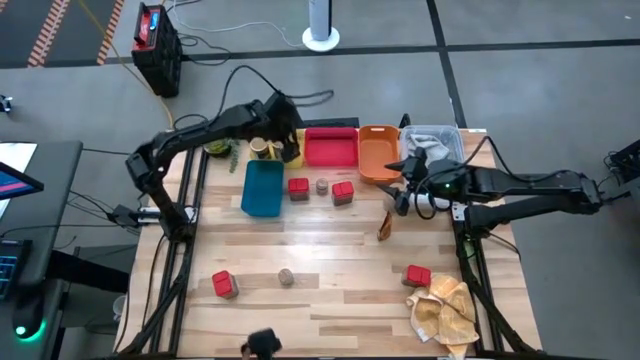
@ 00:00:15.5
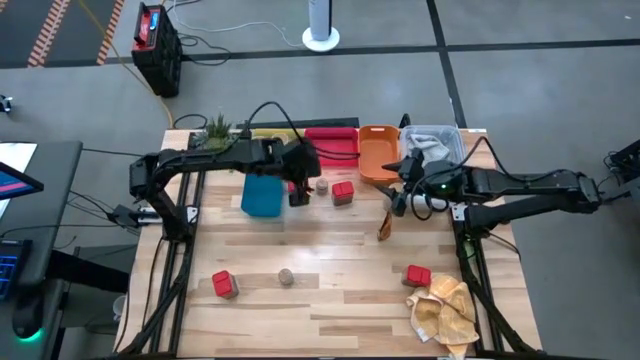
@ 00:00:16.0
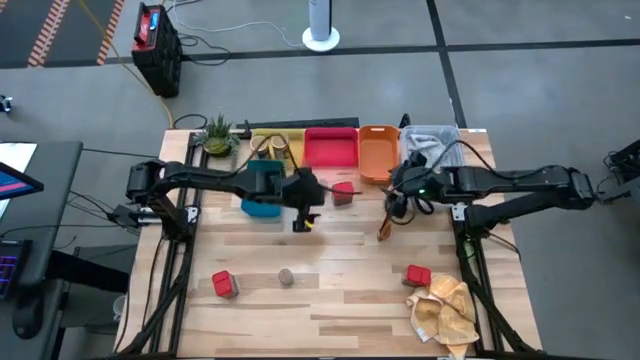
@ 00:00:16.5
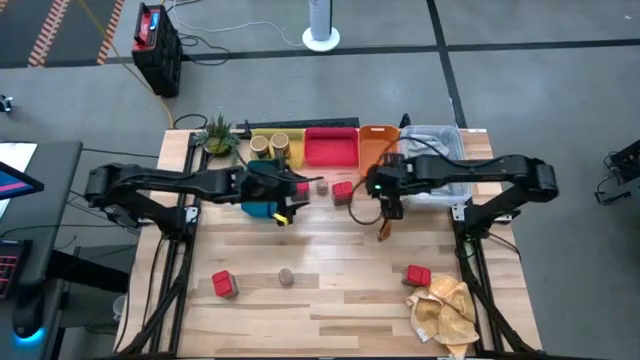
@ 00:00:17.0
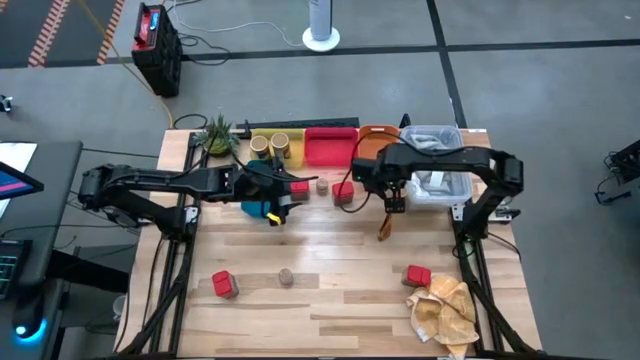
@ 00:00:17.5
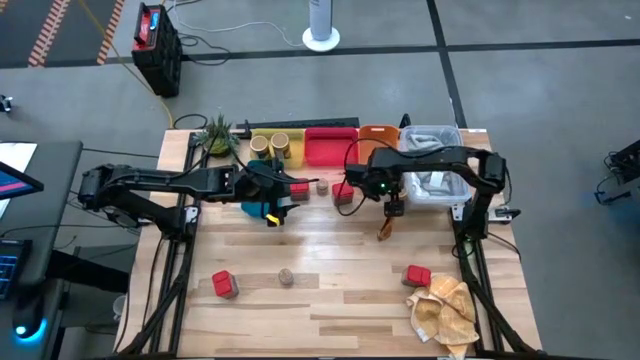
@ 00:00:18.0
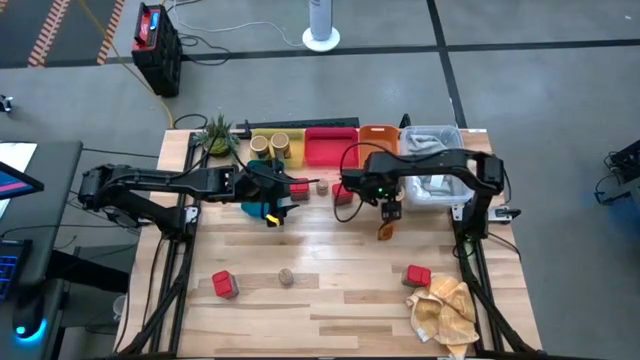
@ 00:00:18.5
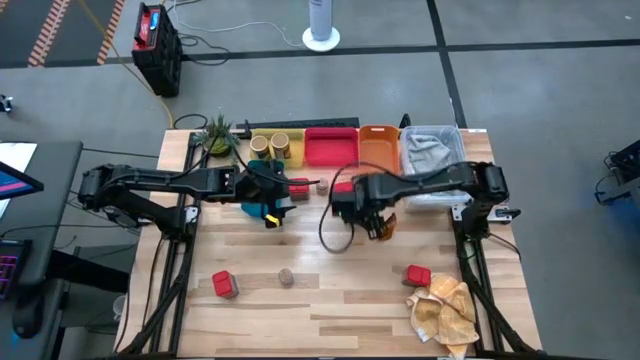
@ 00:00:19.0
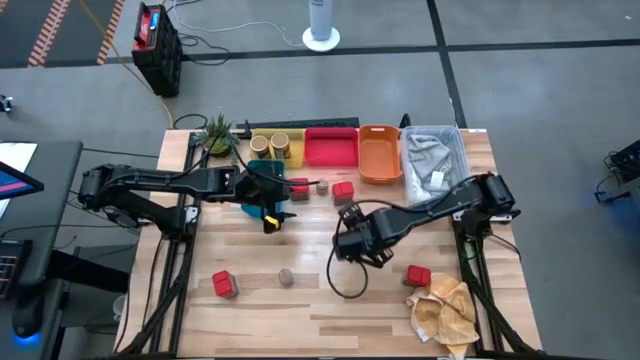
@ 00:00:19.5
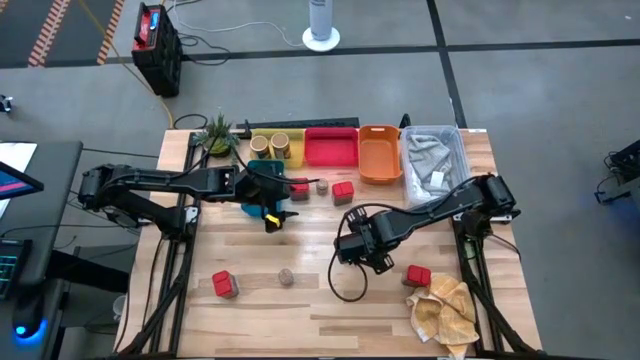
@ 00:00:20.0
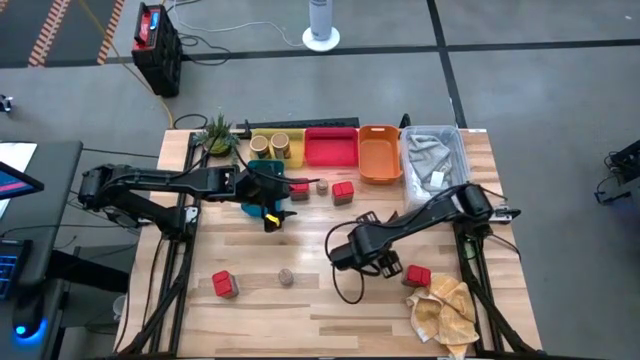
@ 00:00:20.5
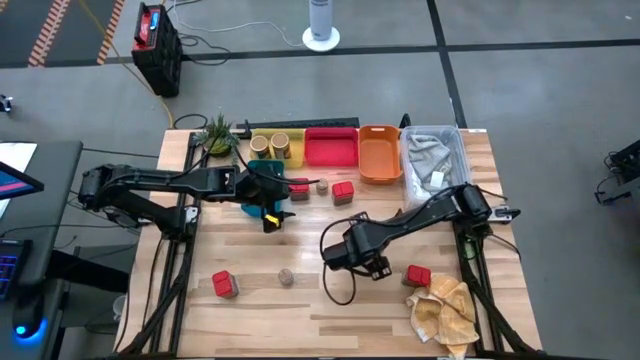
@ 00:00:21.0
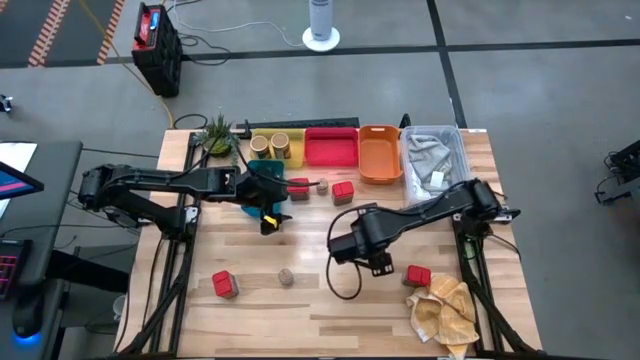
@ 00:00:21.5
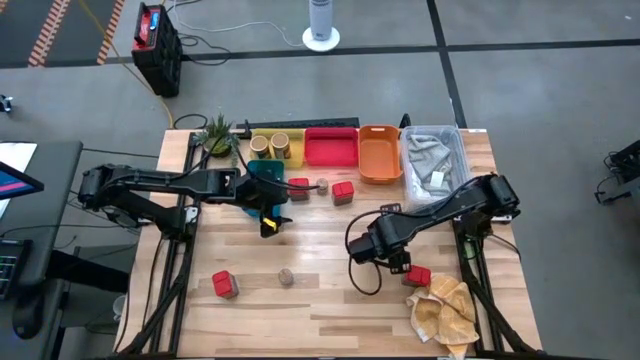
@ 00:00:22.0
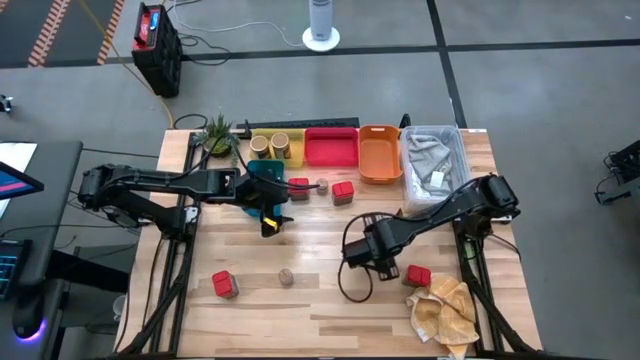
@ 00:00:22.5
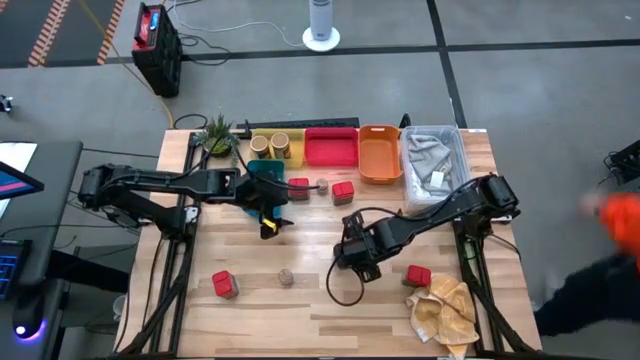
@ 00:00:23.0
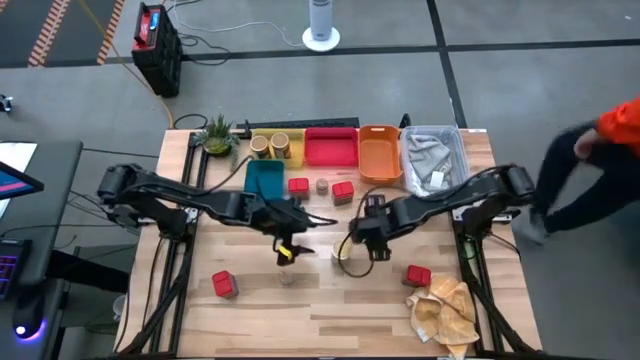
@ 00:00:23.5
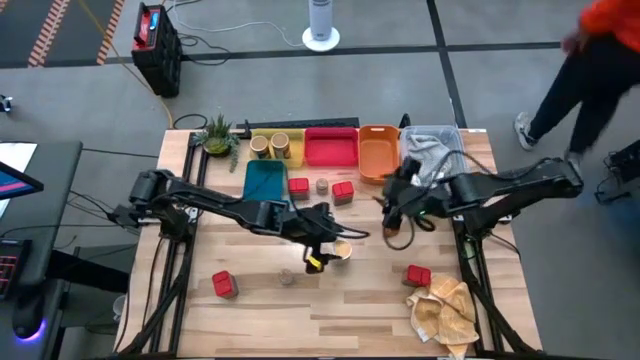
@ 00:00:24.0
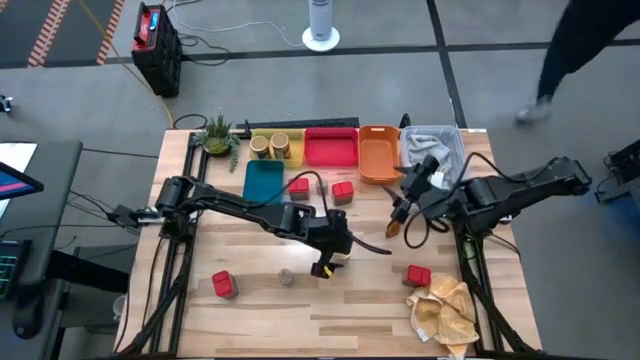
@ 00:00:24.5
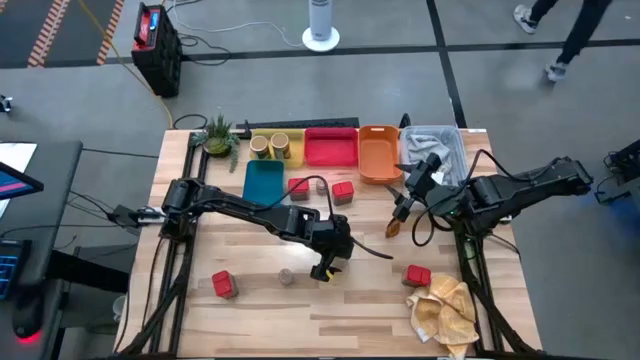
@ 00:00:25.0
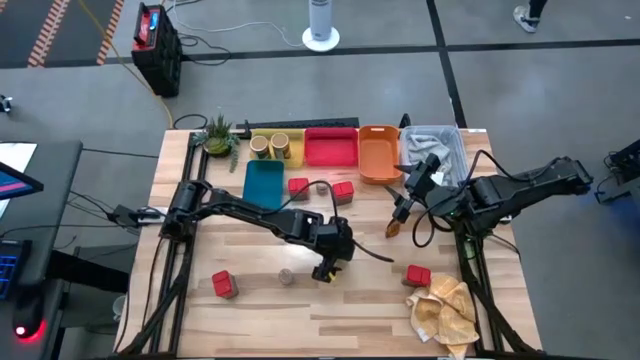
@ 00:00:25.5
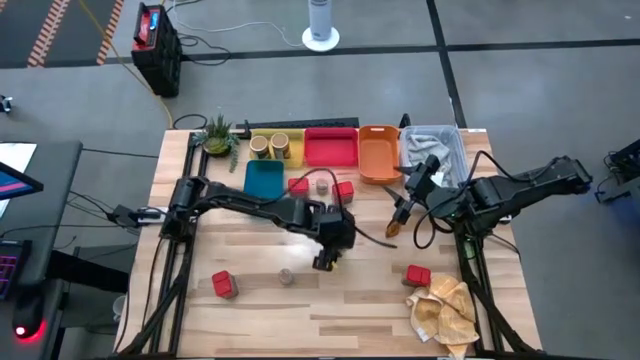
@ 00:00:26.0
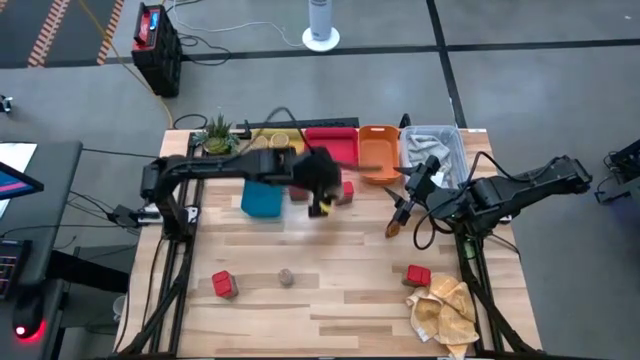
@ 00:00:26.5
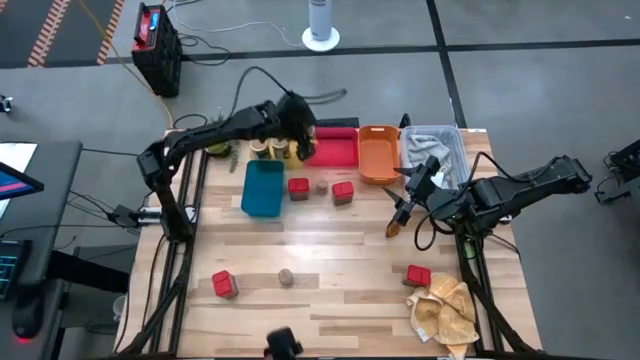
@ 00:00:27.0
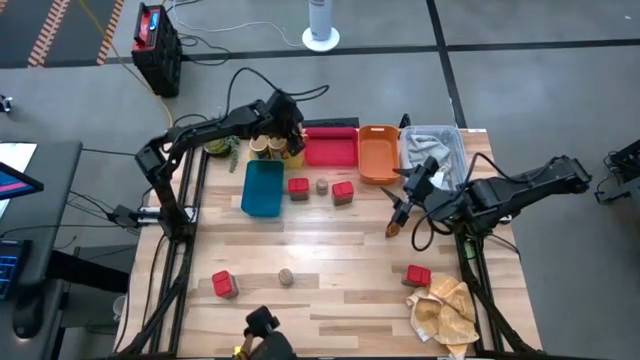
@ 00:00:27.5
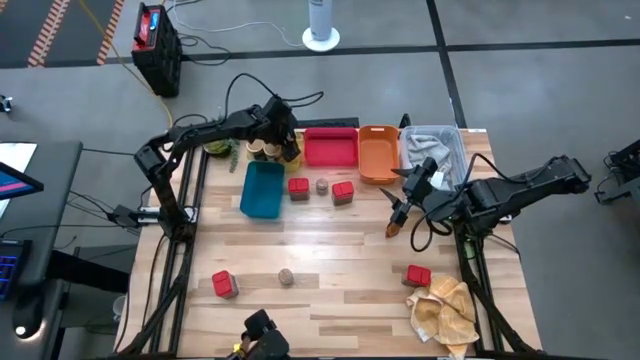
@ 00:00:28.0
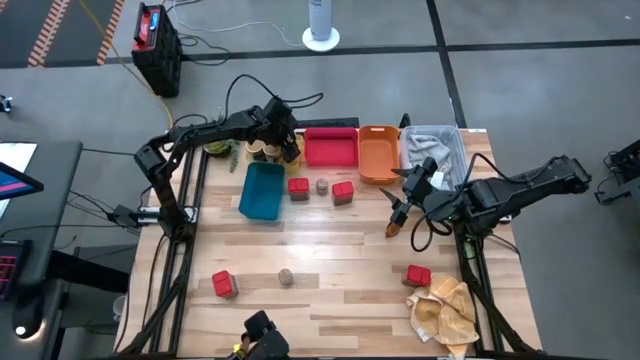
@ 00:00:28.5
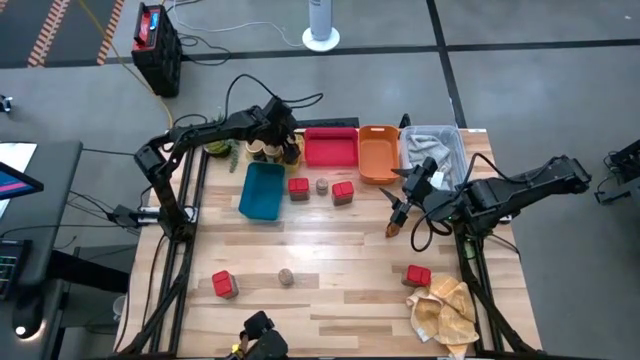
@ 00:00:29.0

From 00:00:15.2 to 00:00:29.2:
Task: Sort spices by type
Put the golden seasoning bottle into the yellow bin

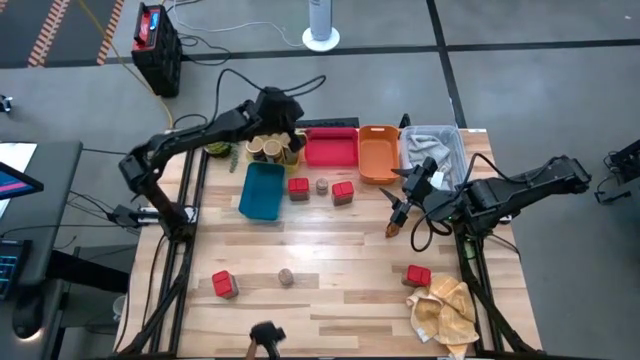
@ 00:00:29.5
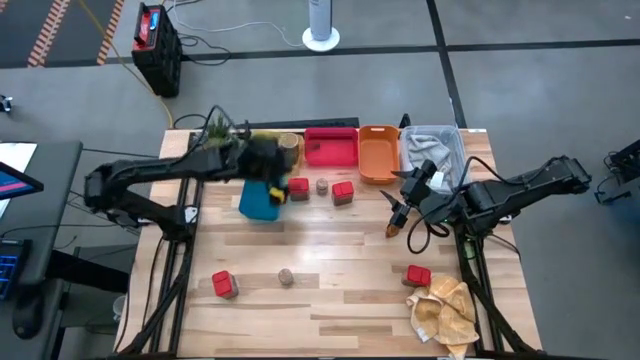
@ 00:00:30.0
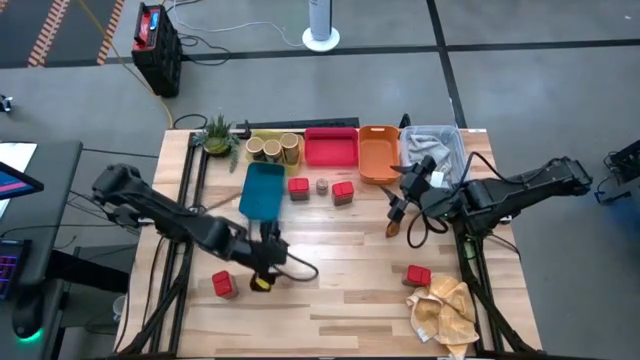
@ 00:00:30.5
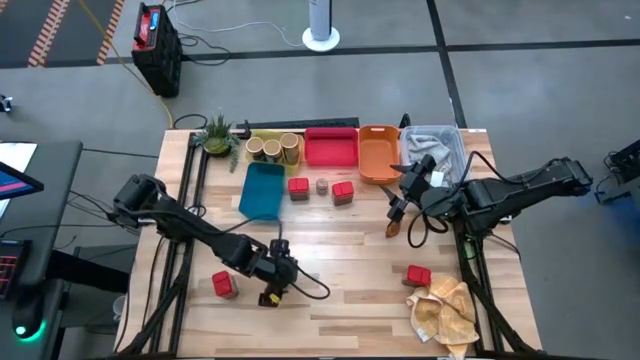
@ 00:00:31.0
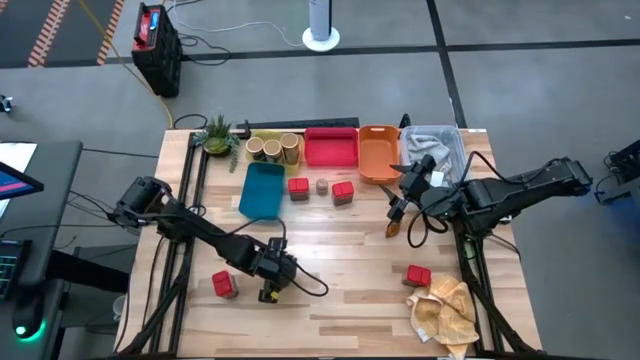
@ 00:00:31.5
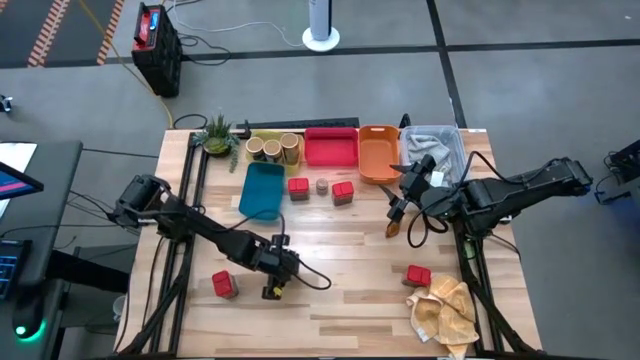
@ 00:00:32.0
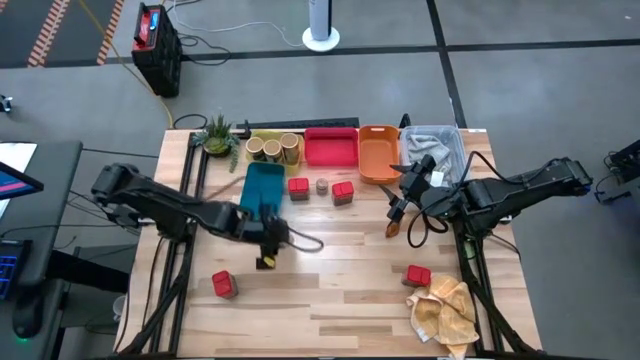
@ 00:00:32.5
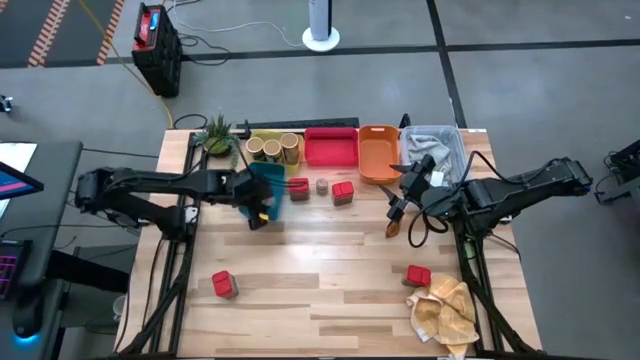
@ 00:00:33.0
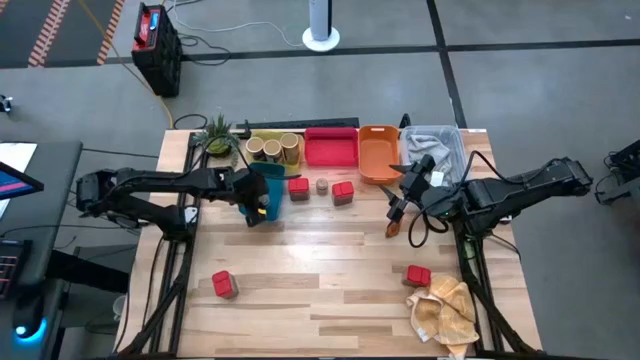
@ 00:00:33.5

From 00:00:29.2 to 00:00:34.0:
Put the bottom transparent seasoning bottle into the blue bin

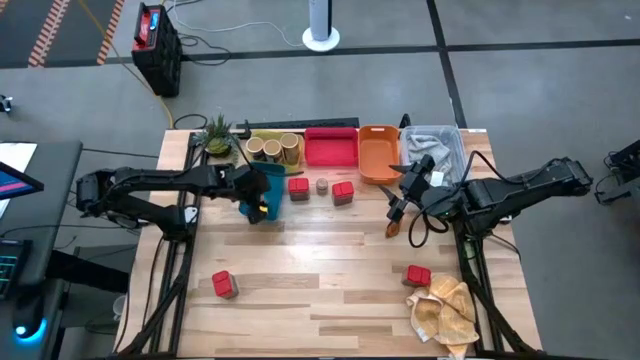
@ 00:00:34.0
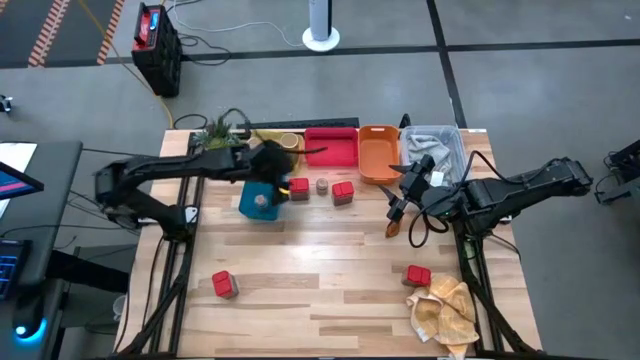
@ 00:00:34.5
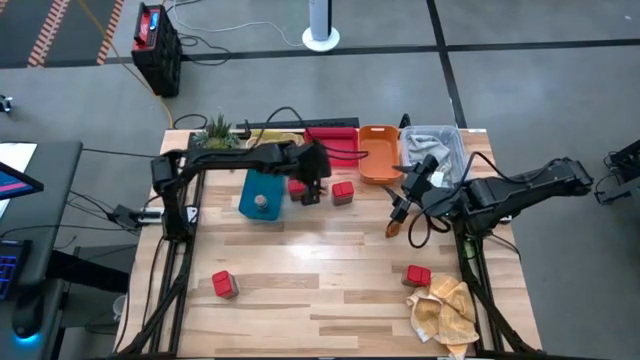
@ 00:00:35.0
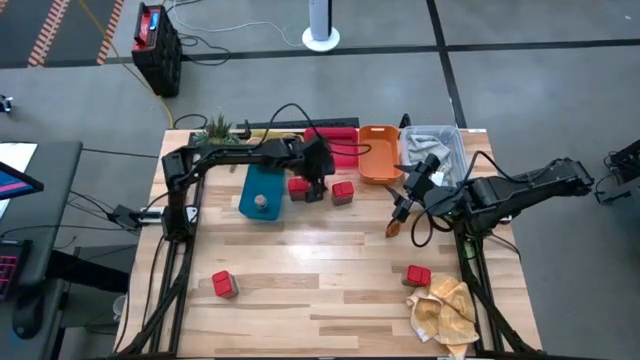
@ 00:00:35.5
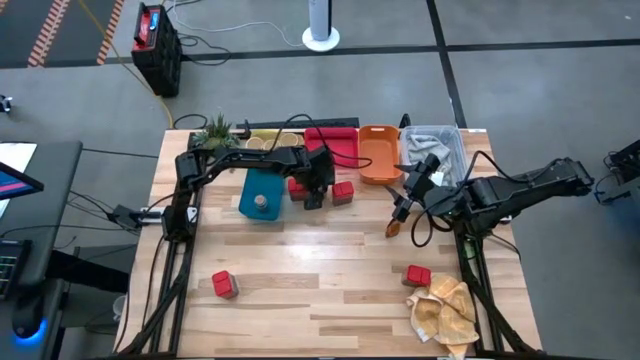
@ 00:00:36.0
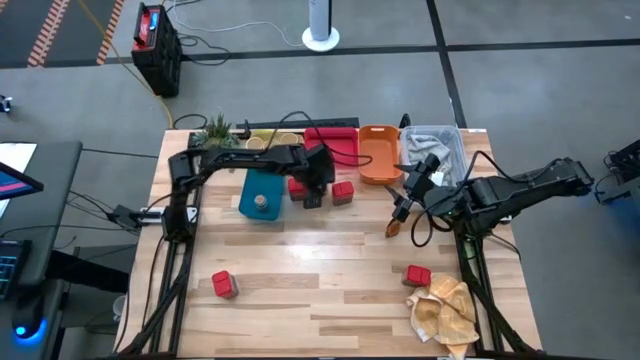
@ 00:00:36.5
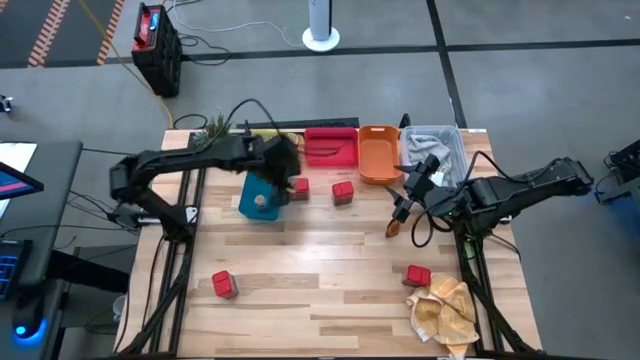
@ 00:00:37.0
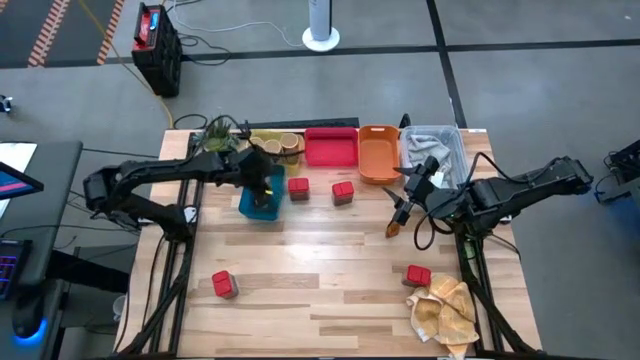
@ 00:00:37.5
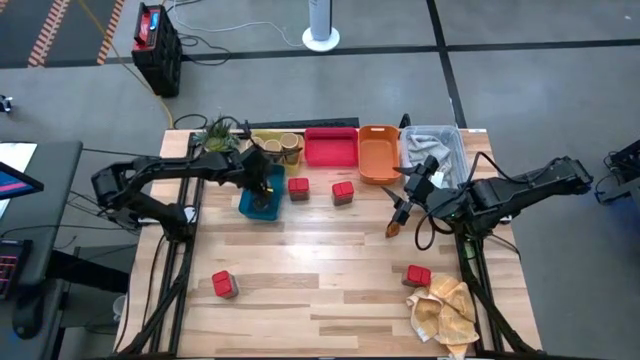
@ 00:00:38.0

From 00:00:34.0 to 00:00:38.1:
Put the transparent seasoning bottle into the blue bin
